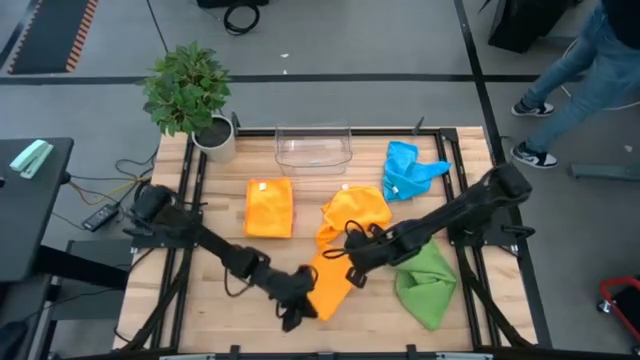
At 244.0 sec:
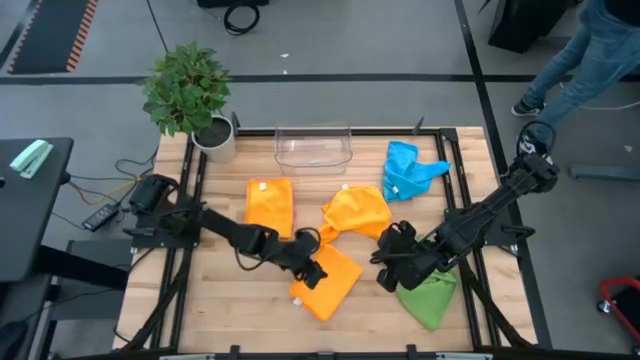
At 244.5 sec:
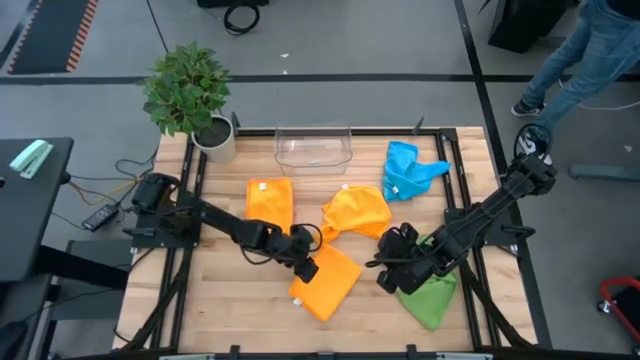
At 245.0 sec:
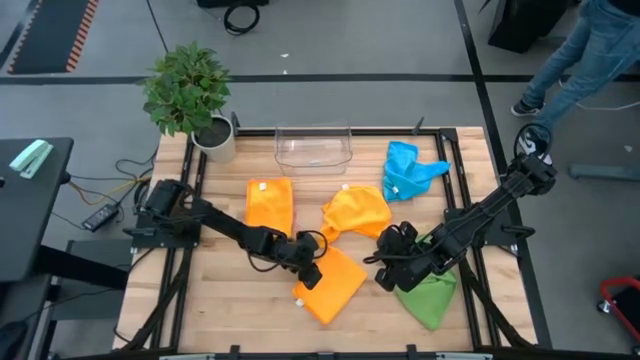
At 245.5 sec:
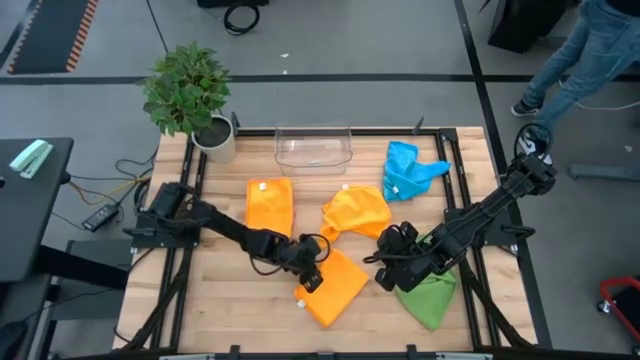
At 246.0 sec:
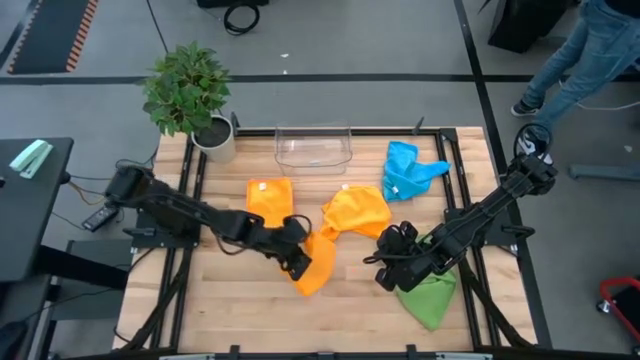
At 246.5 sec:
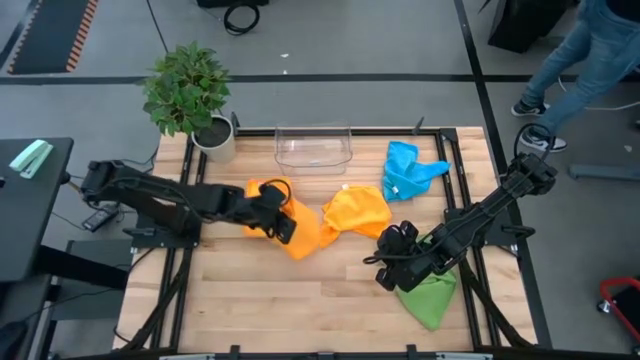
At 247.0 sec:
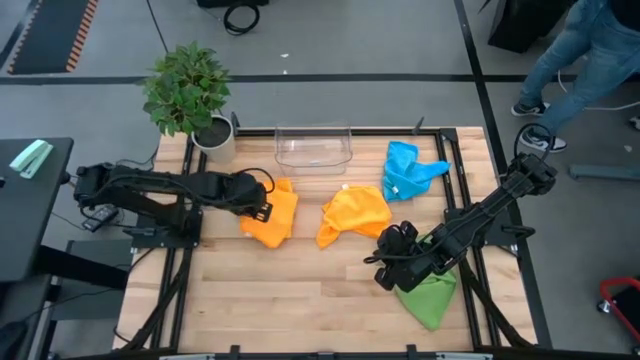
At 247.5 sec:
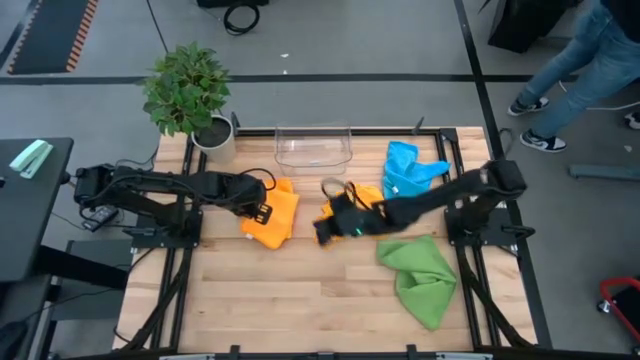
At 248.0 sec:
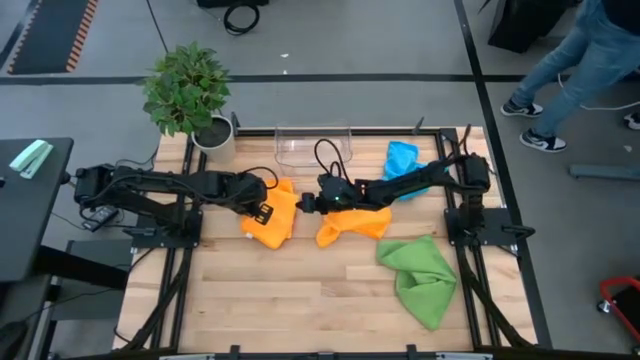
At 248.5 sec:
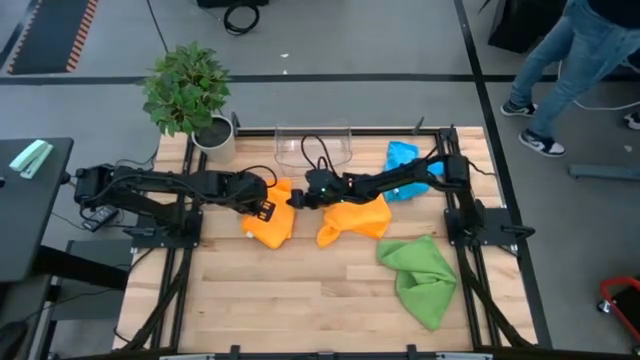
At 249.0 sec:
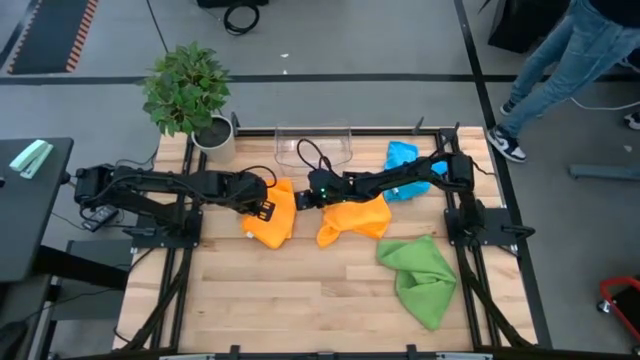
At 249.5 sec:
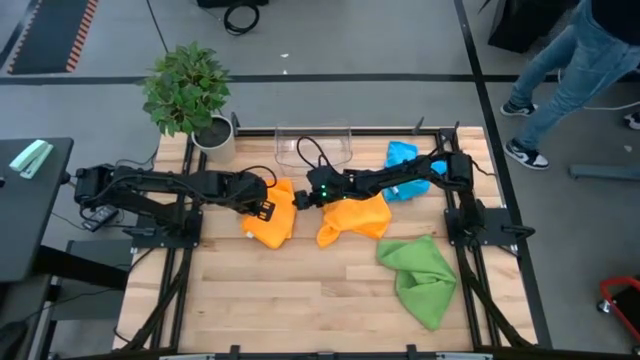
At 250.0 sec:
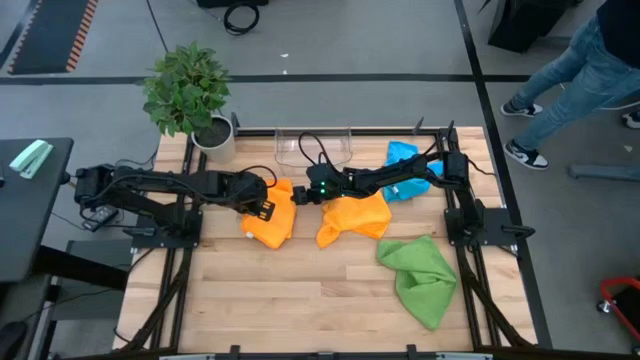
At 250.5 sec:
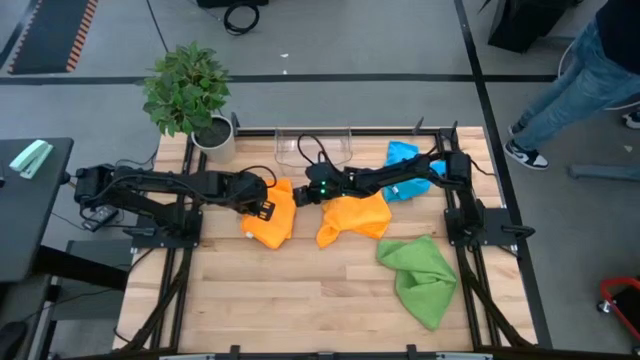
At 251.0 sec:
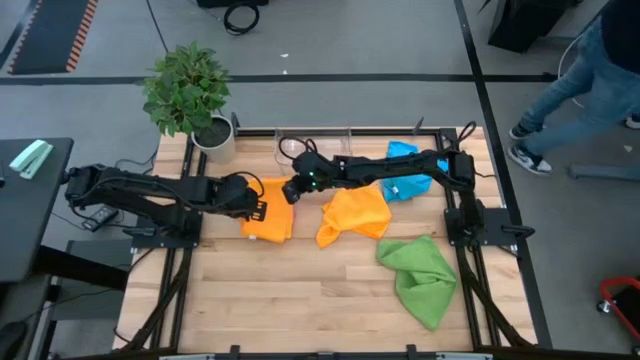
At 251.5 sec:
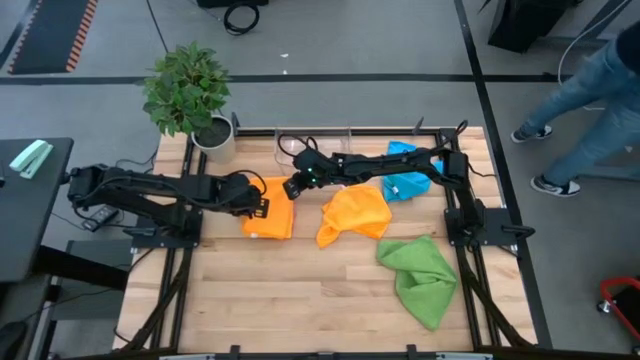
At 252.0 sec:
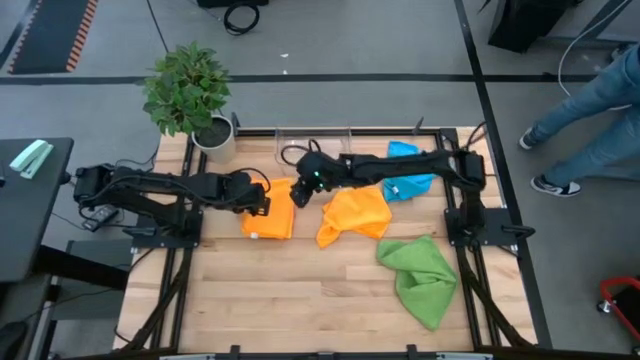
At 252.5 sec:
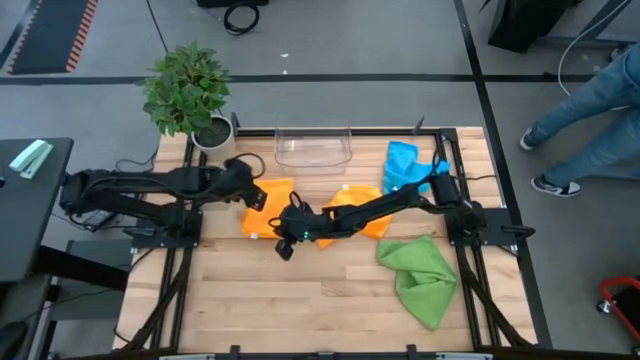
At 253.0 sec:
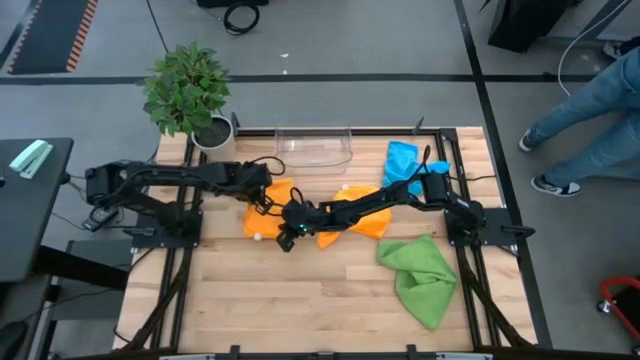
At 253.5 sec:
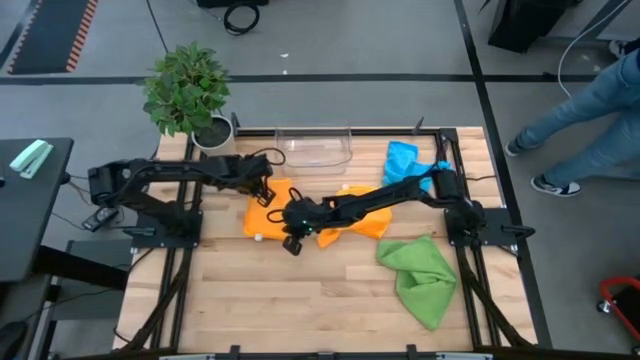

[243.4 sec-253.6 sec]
Task: Fold microfiber towels
Stack the bottom folded orange microfiber cloth on top of the folded orange microfiber cloth

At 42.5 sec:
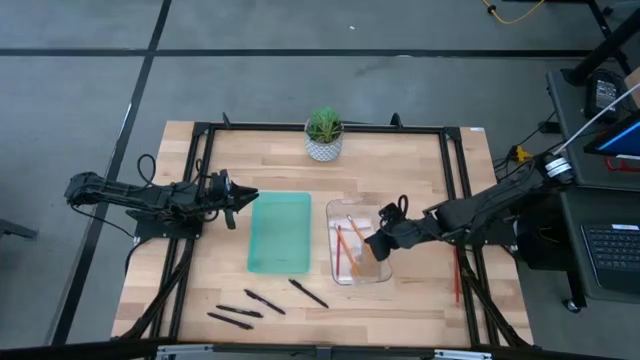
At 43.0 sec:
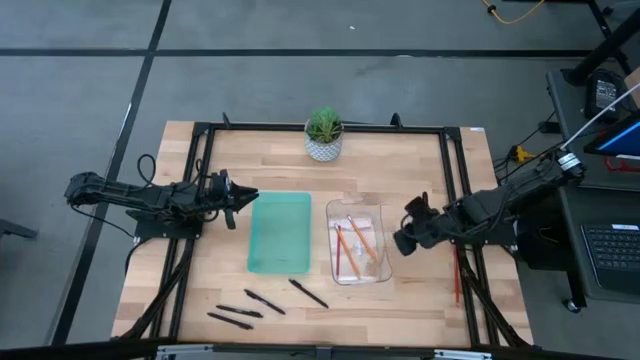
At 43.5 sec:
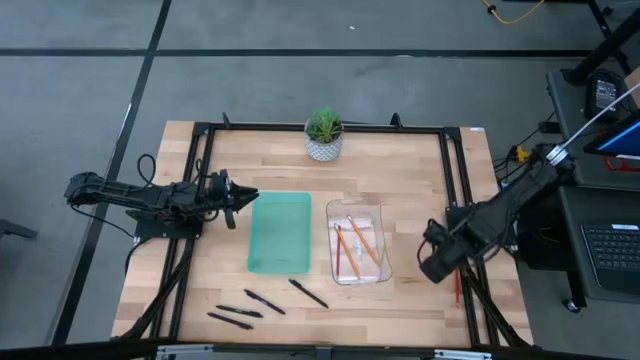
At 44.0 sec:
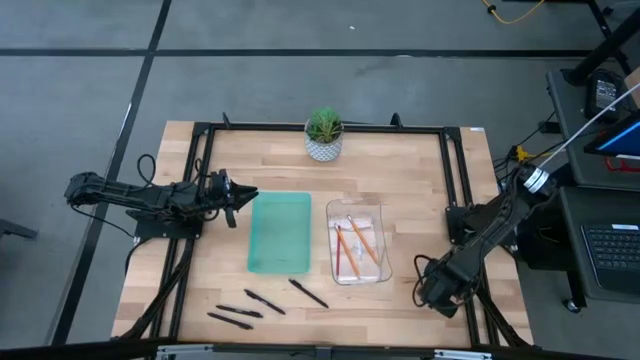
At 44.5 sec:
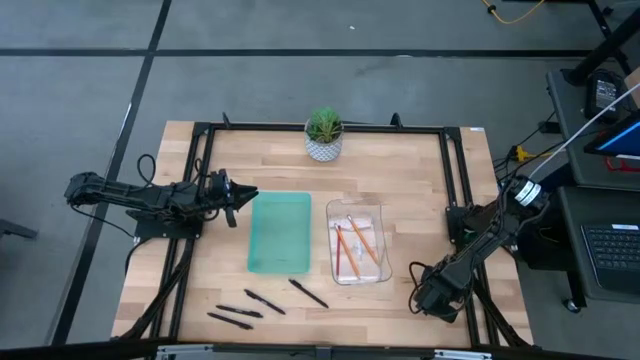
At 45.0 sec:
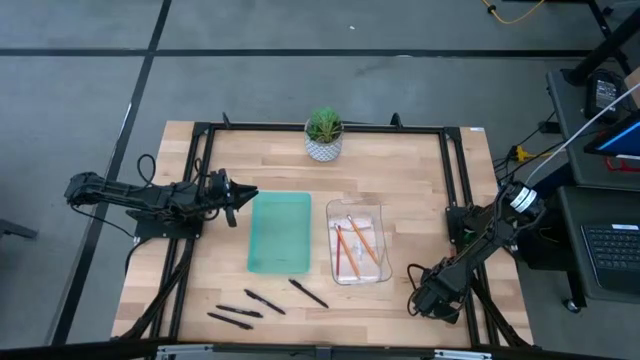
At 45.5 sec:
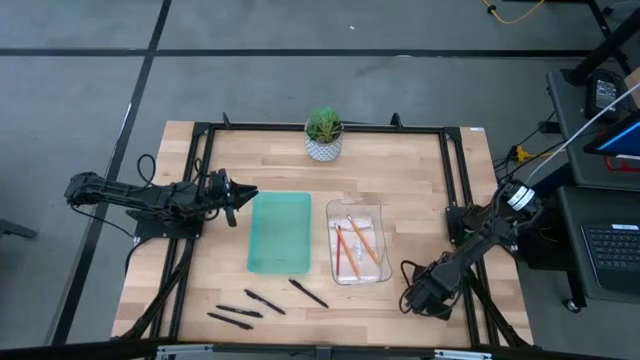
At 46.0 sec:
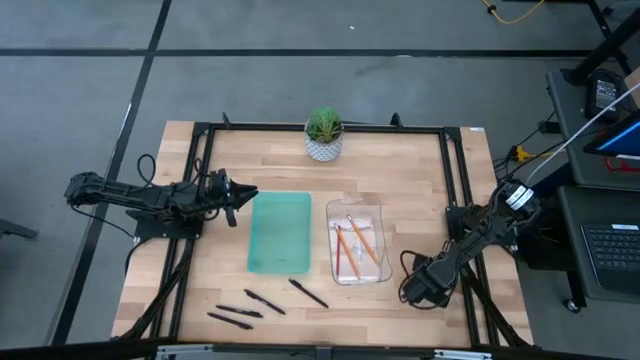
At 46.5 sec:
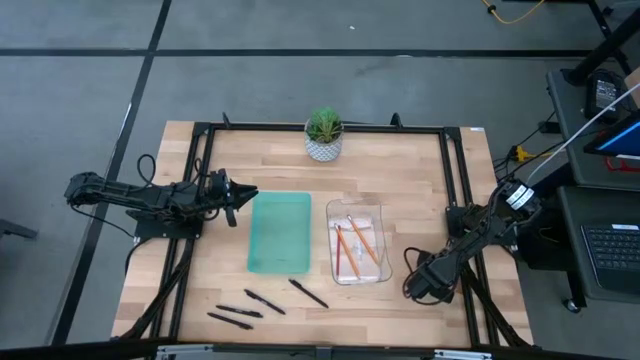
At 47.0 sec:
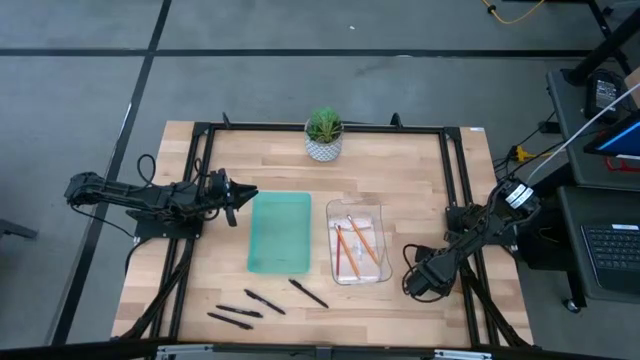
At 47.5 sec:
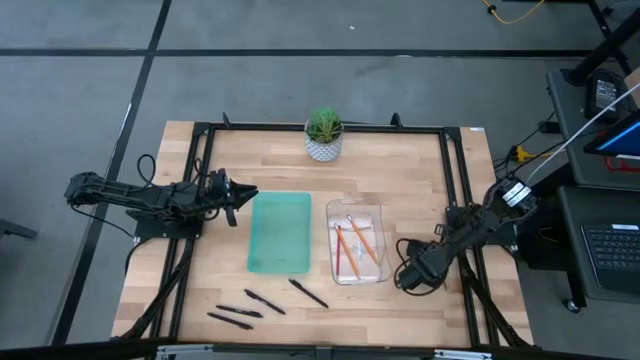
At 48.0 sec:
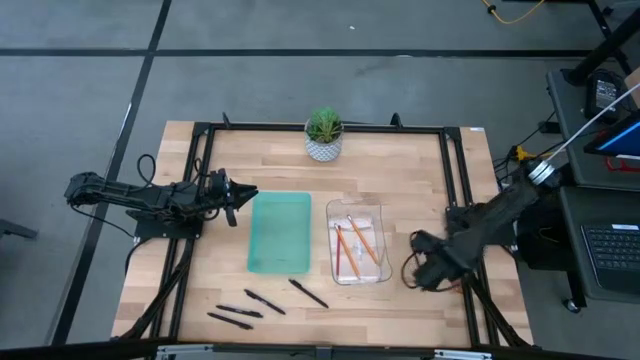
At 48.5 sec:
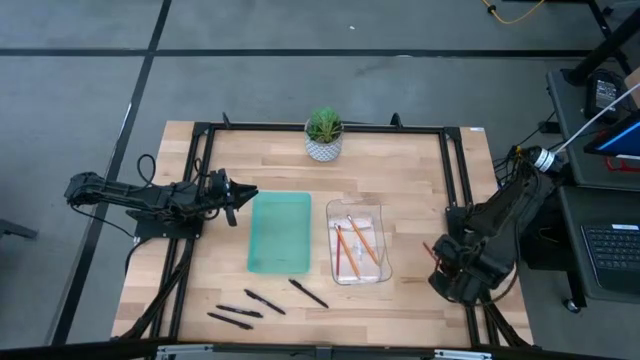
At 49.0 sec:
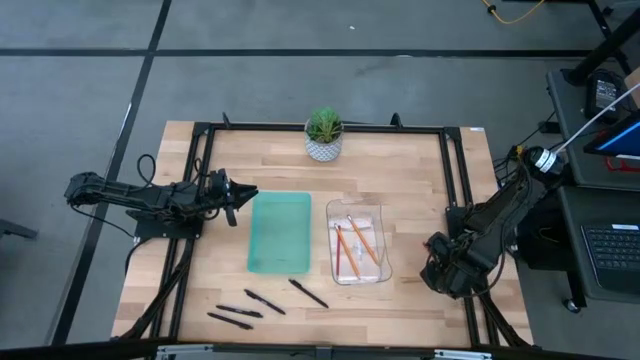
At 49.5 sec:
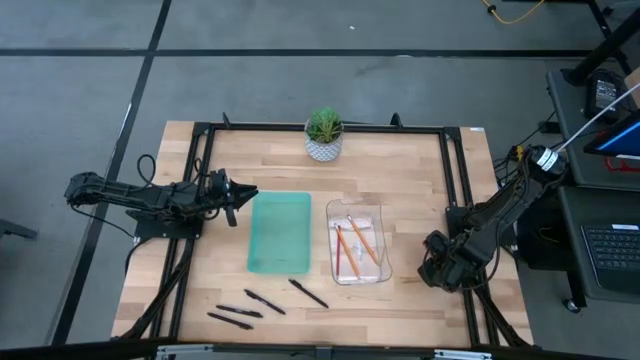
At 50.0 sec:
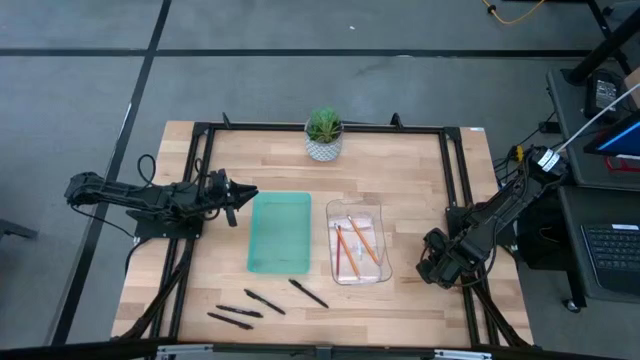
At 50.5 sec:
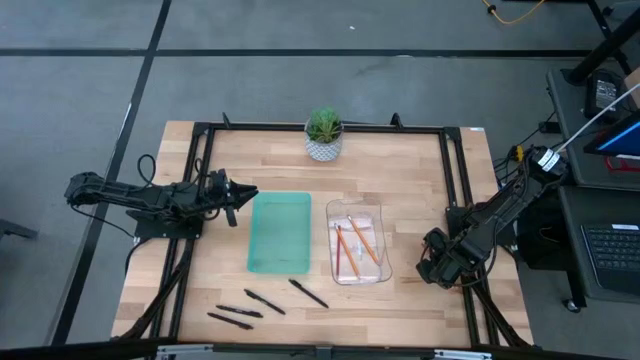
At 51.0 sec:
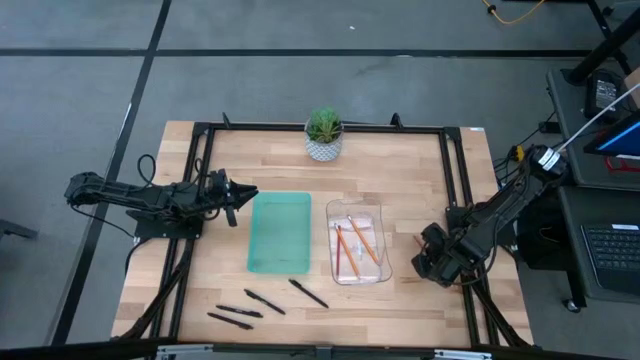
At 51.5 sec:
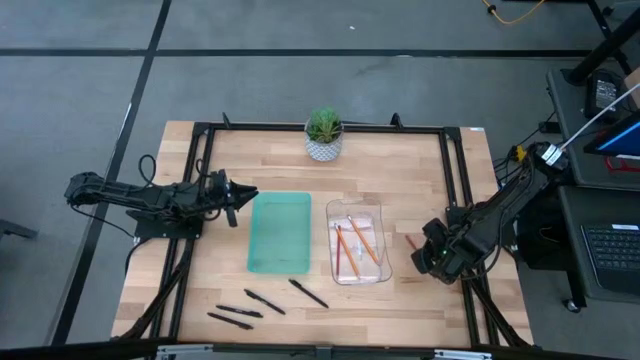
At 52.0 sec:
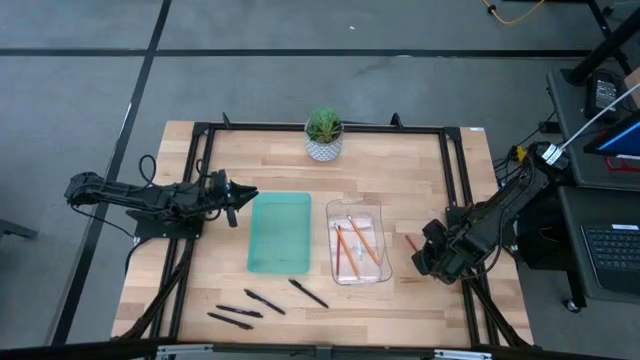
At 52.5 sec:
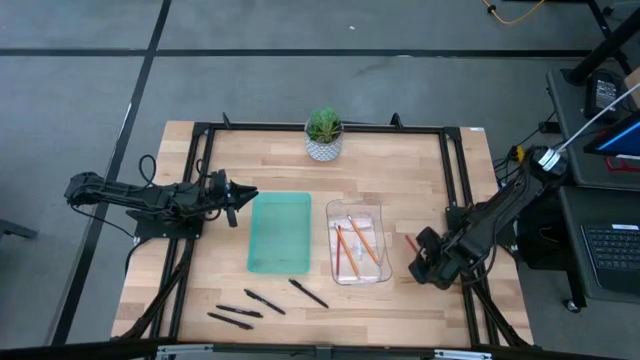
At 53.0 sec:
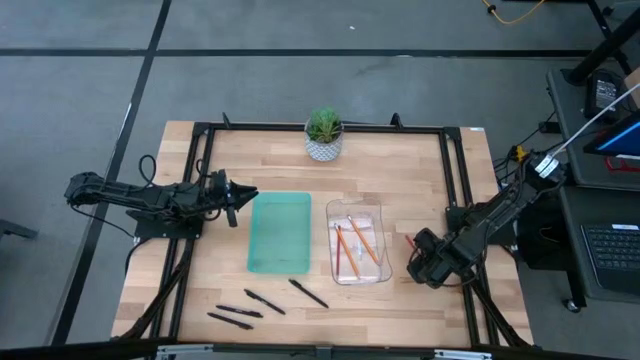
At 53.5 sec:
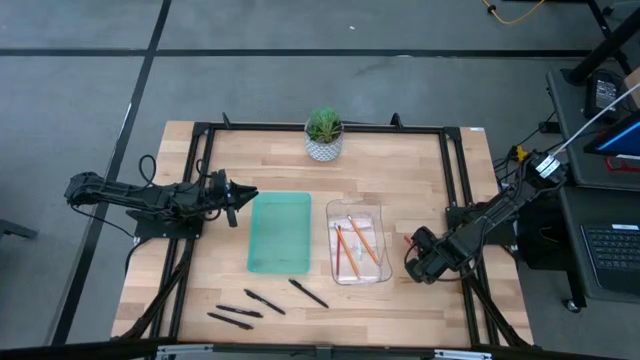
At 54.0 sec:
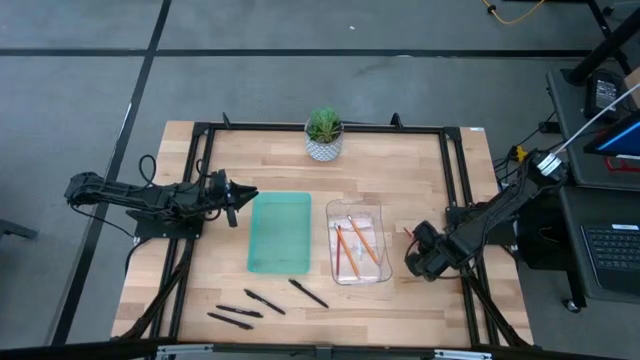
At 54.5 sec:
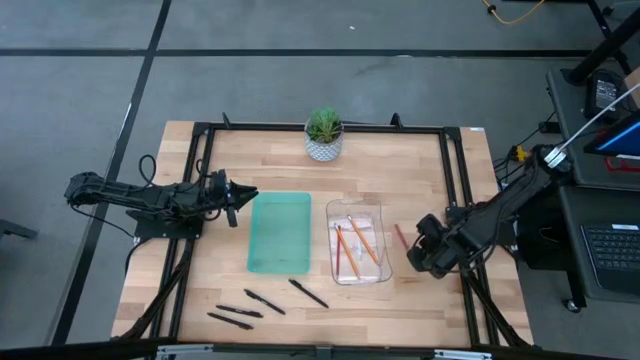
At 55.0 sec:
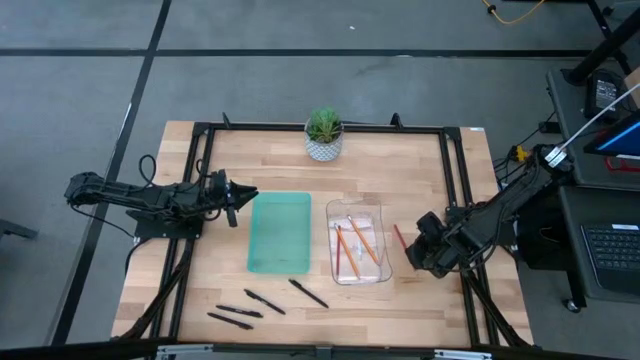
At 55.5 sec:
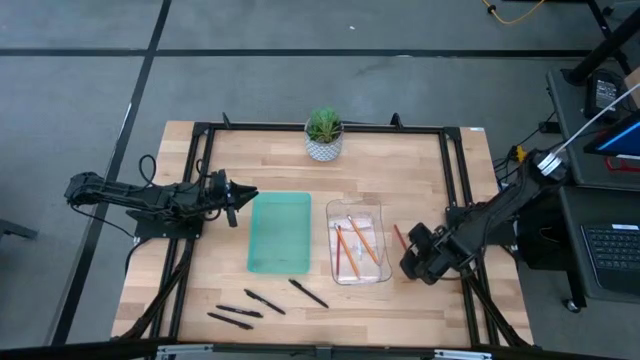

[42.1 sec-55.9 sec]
Task: Sort pens & pencils
Put the red pencil into the transparent bin
